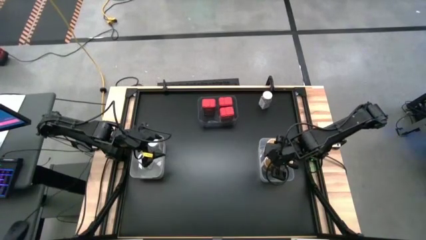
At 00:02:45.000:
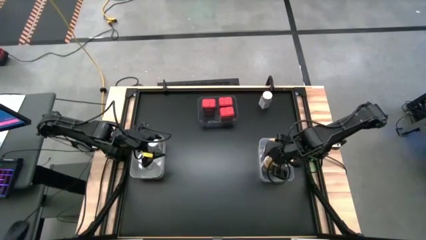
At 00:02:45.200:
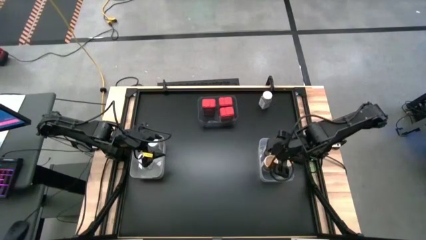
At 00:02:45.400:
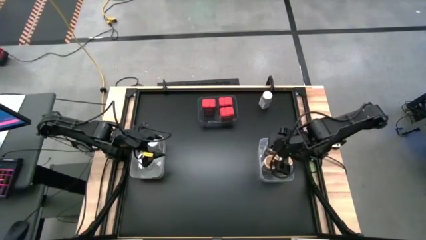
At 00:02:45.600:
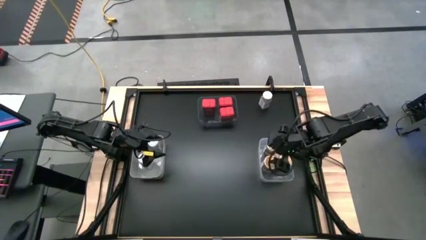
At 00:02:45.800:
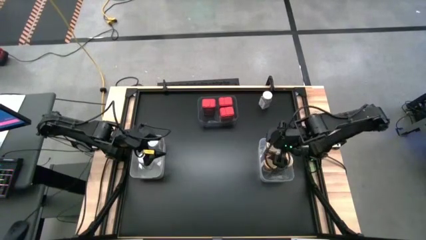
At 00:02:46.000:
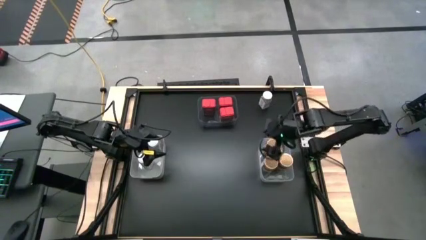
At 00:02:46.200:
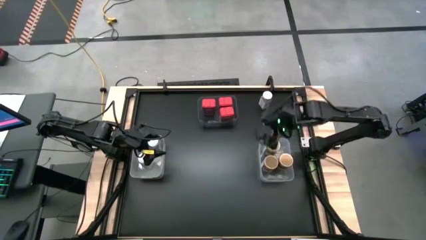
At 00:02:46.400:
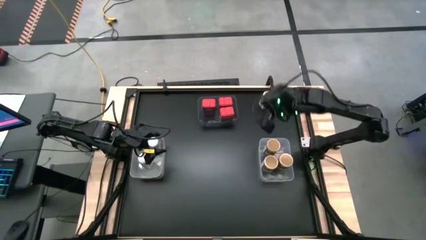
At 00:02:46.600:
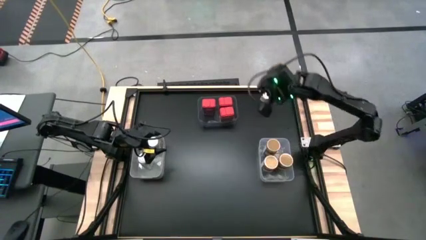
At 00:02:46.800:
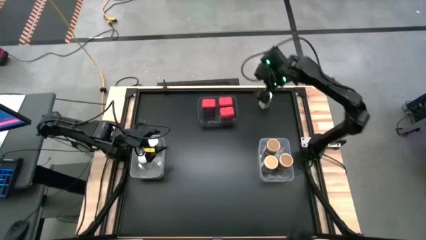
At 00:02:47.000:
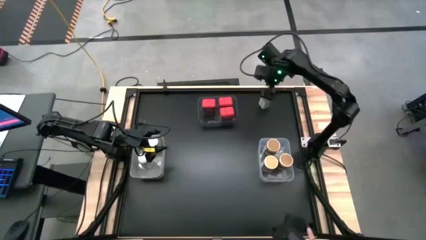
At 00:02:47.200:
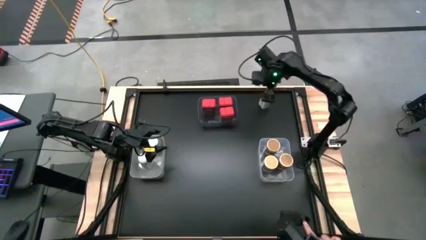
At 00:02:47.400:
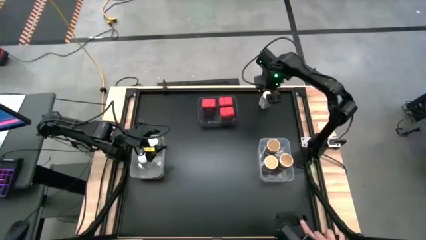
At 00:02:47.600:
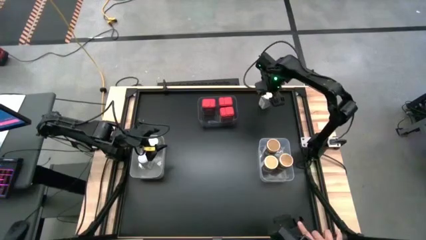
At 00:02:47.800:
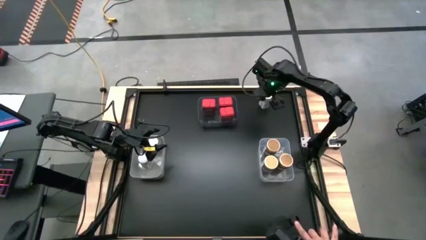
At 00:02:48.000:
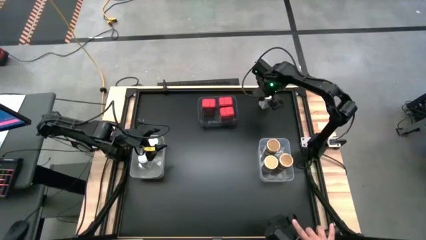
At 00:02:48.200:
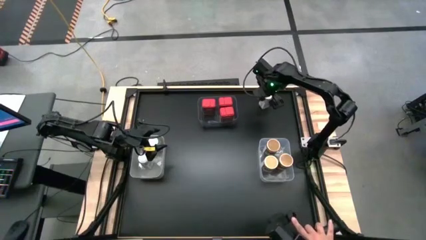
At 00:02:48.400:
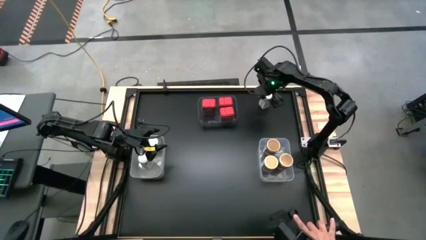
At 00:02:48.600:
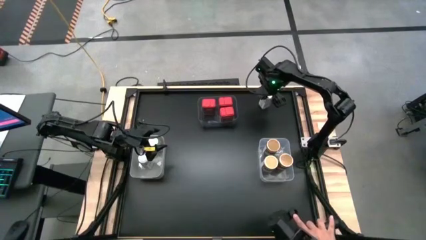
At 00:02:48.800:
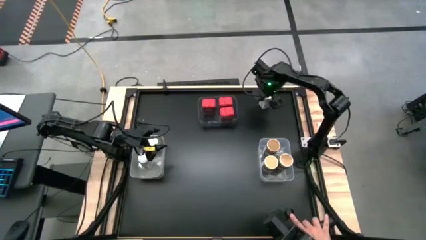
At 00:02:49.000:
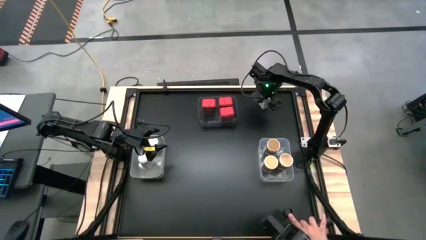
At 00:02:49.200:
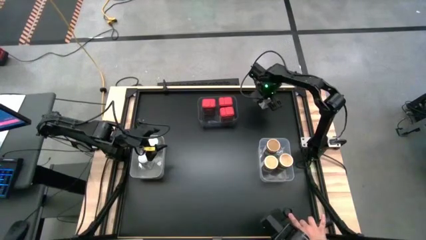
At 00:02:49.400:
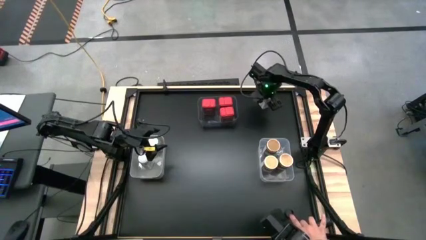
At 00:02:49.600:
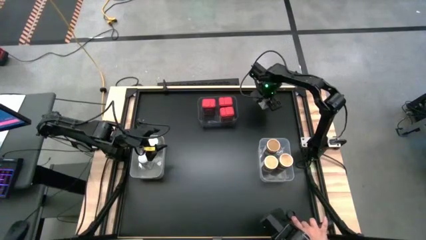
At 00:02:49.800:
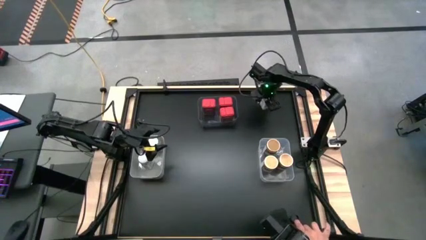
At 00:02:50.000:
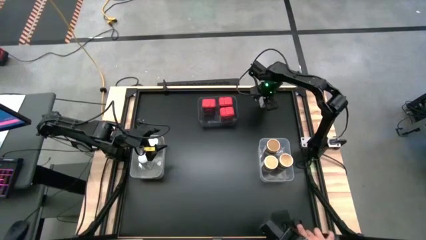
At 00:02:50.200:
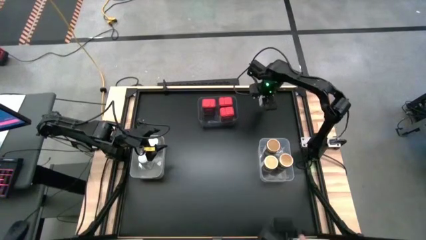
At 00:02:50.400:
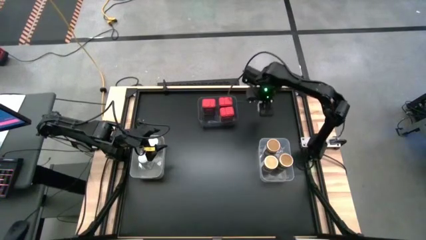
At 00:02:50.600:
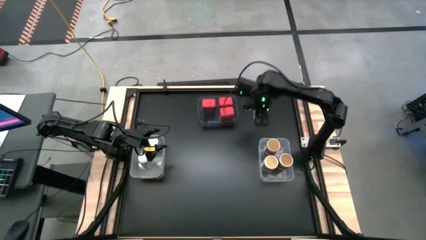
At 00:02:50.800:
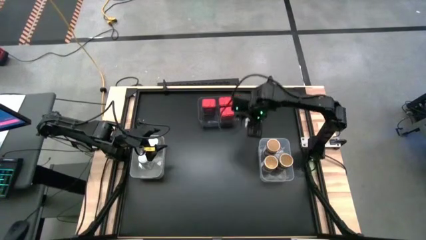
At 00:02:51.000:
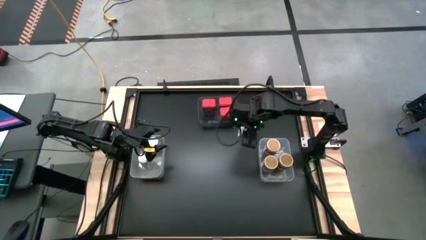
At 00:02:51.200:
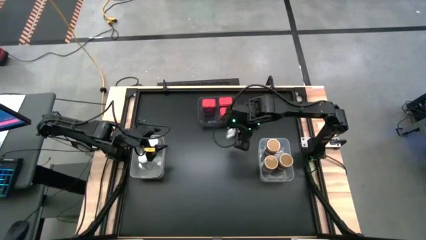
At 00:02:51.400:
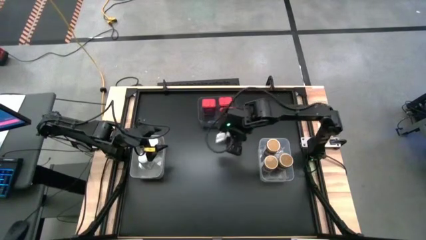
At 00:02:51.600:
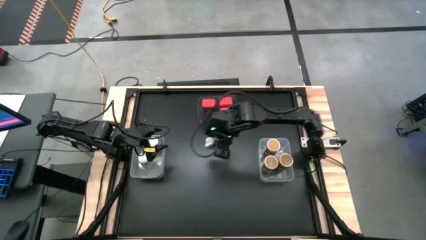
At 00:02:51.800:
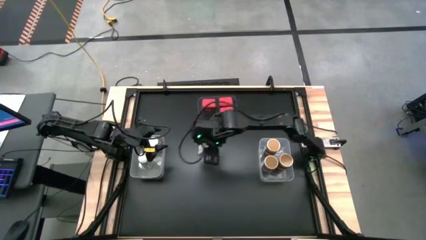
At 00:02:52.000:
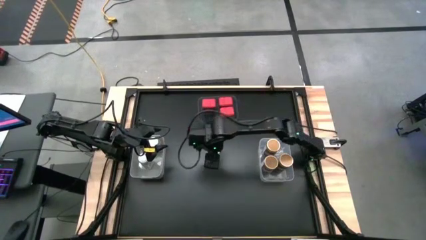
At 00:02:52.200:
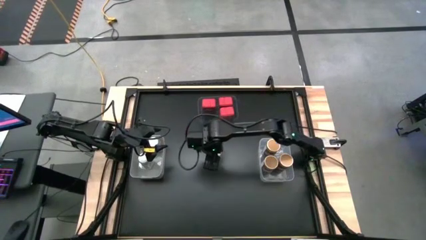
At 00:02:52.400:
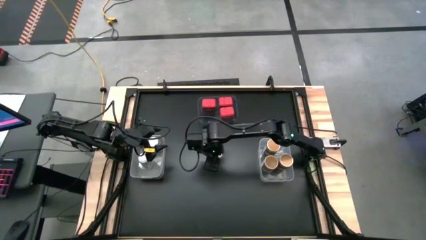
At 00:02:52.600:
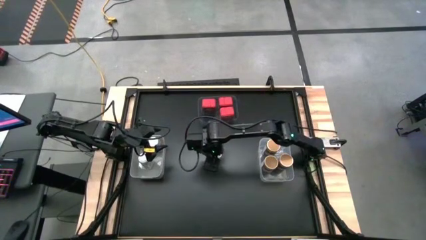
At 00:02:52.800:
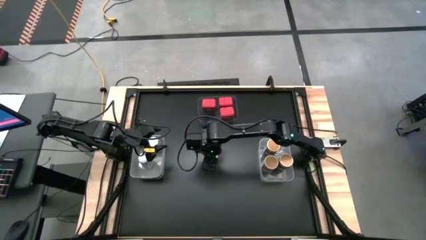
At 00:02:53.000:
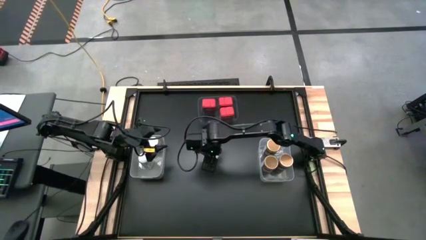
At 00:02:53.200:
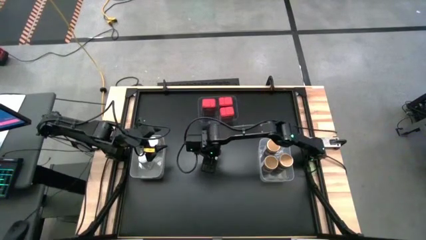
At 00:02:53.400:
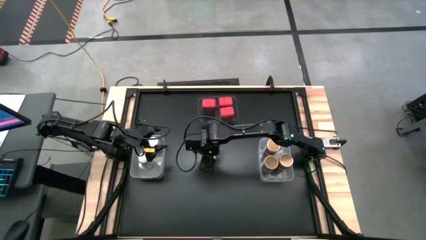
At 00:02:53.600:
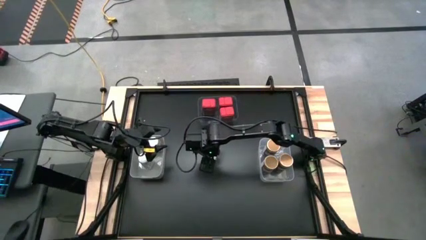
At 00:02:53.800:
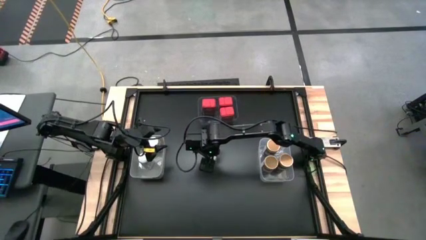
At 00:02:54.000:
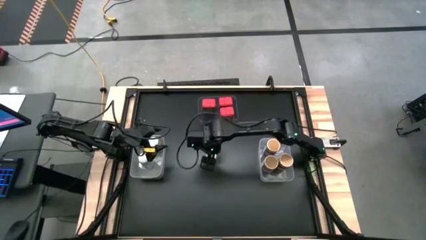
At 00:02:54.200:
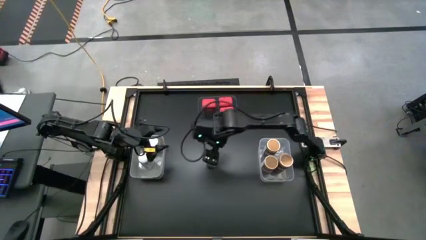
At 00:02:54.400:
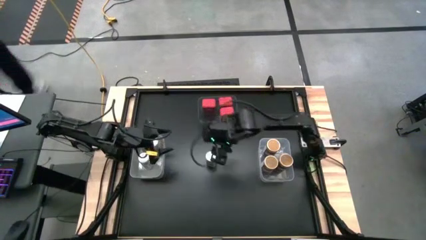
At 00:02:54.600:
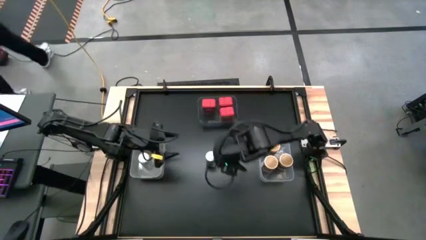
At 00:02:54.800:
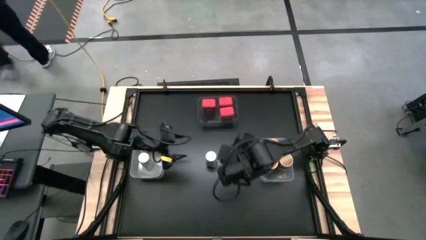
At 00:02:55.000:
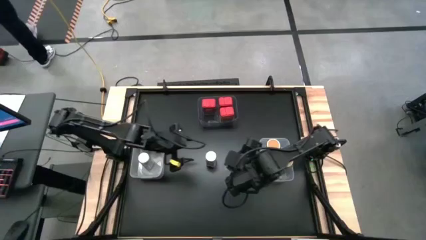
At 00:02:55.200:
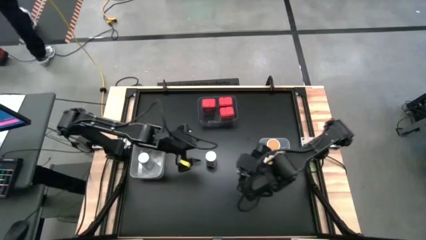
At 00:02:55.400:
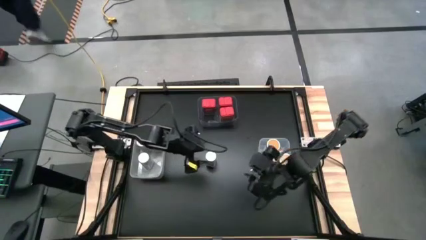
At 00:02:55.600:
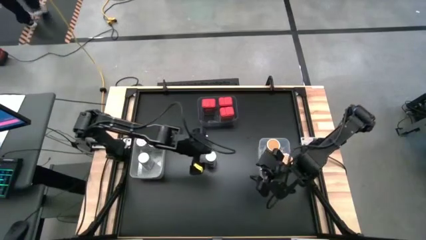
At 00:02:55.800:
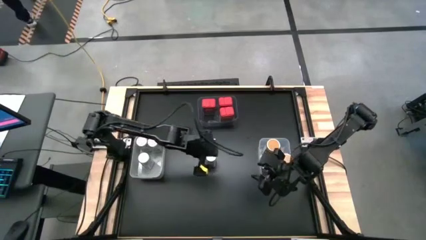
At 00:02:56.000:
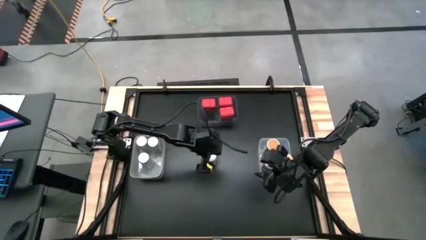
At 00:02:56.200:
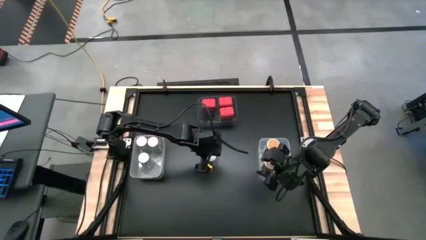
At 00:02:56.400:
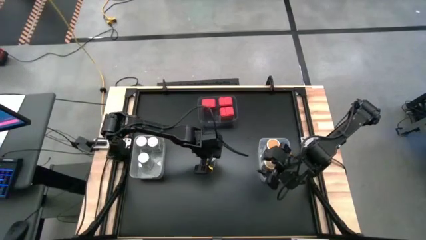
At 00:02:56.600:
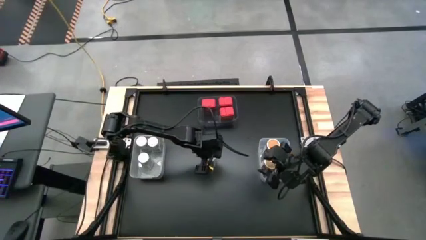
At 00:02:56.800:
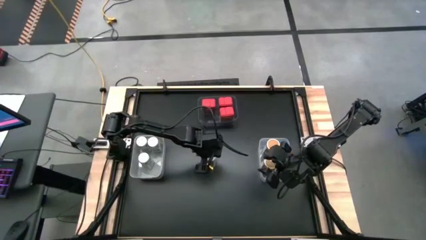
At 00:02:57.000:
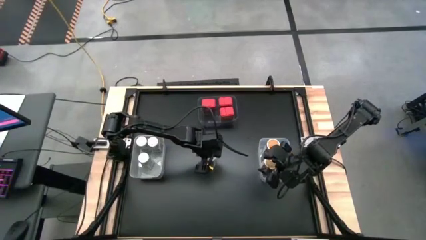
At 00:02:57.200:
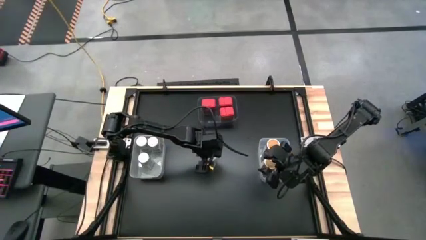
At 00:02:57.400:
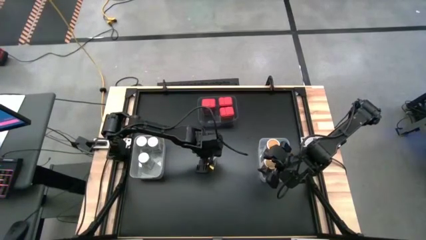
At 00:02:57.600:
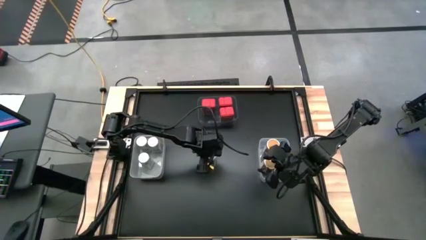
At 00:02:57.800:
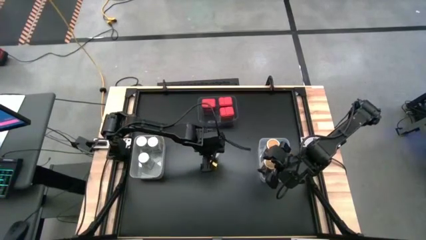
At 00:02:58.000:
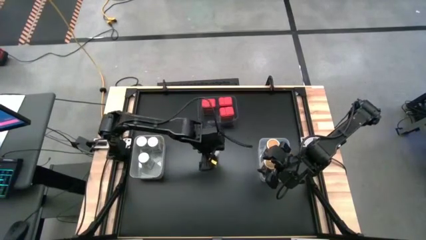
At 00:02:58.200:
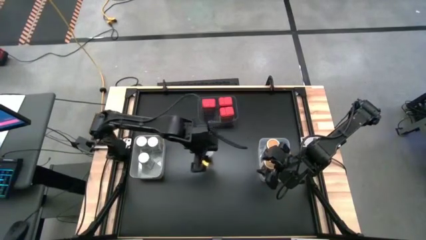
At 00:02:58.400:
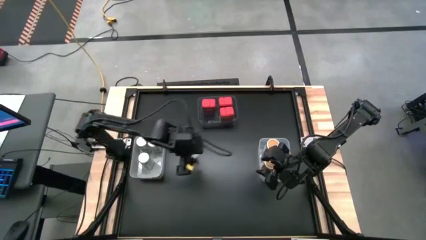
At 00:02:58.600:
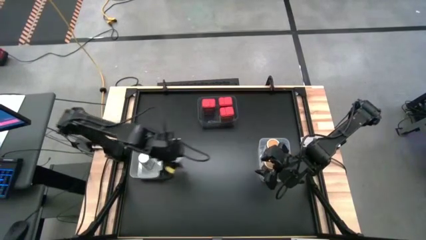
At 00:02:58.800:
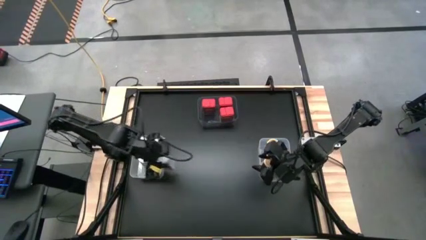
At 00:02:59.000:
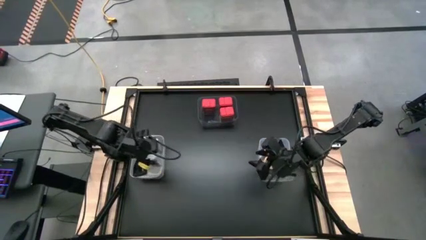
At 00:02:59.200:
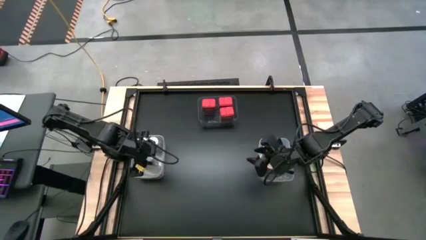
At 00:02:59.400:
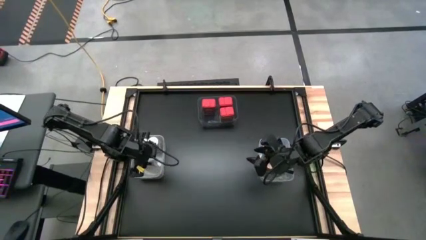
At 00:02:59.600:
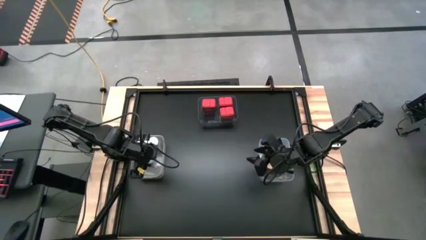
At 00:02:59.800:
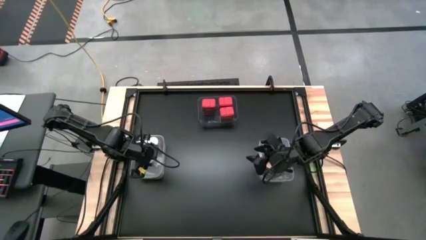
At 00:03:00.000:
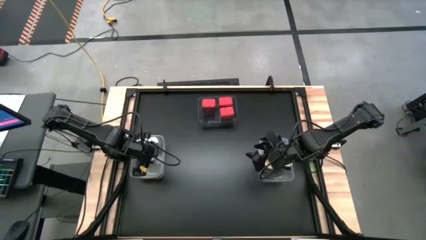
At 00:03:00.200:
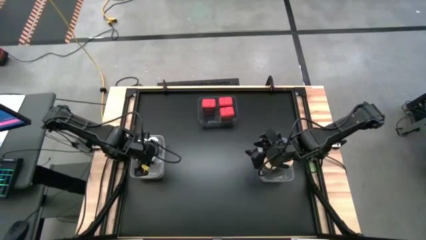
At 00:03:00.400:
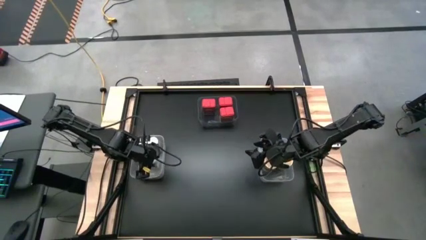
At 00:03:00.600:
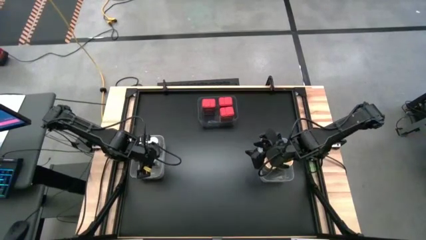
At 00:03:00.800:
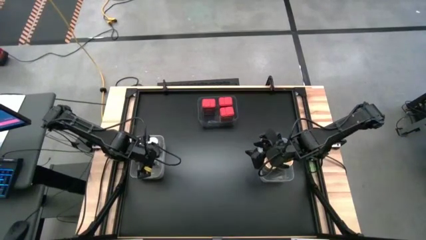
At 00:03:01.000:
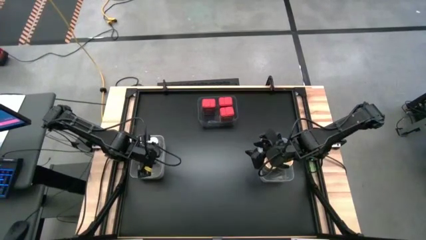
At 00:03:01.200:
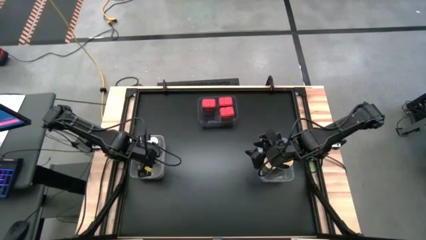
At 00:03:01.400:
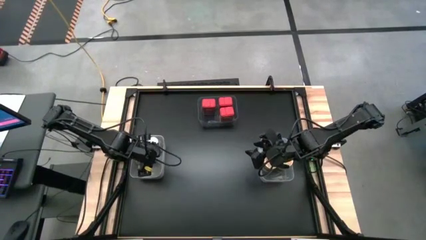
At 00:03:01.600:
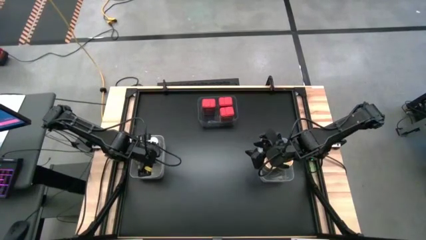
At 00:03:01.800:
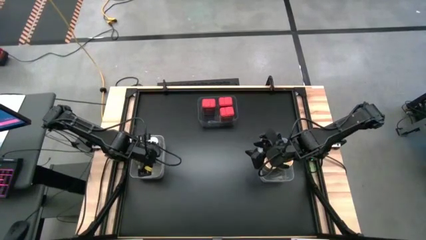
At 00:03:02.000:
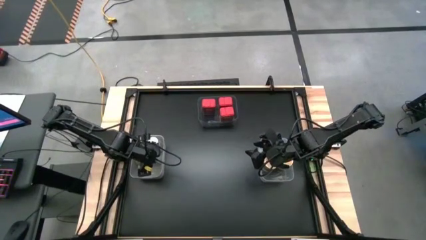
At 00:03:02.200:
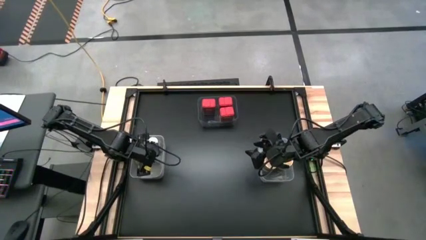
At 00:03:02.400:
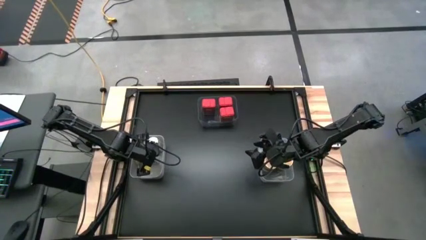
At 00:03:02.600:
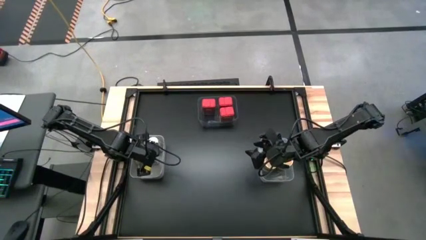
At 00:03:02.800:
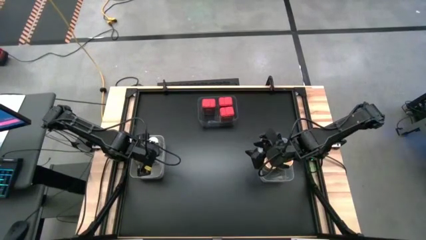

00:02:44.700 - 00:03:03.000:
Task: Sort spices by type
Put the white seasoning bottle into the white bin
